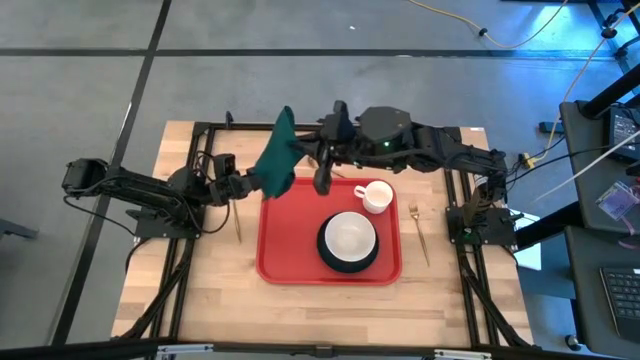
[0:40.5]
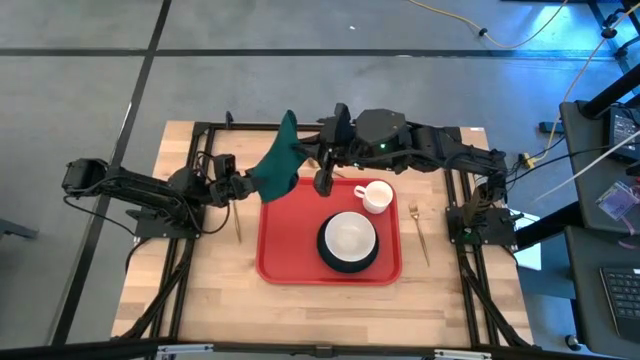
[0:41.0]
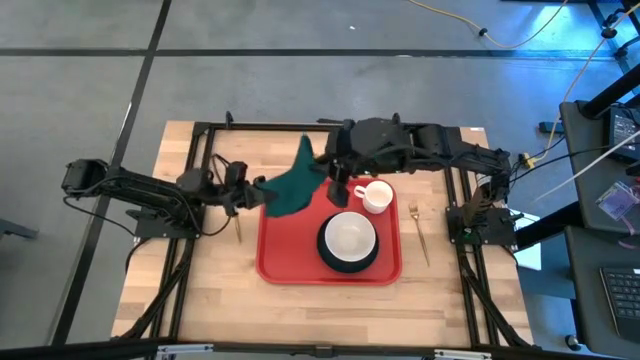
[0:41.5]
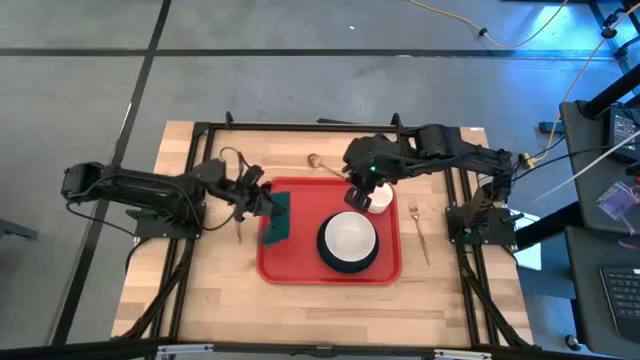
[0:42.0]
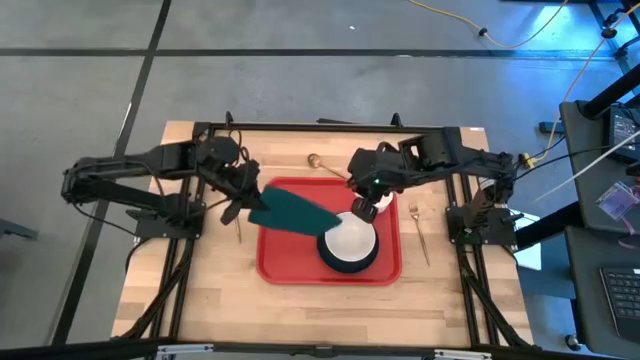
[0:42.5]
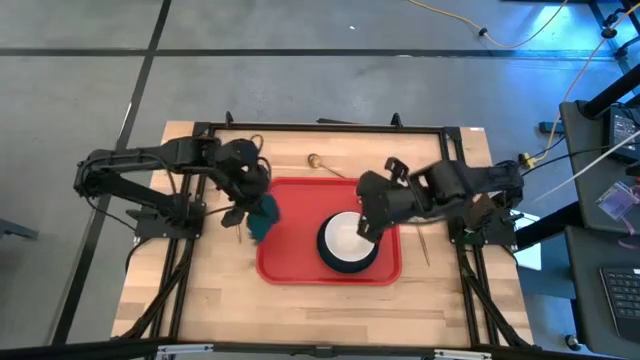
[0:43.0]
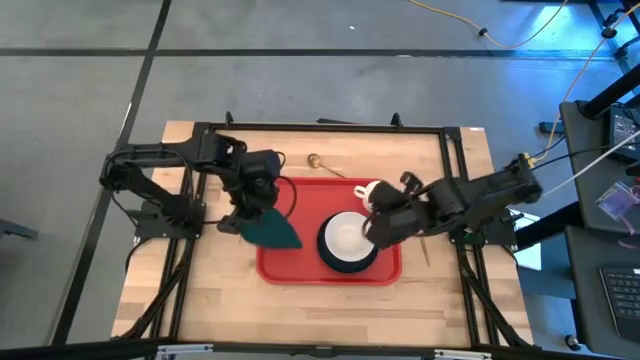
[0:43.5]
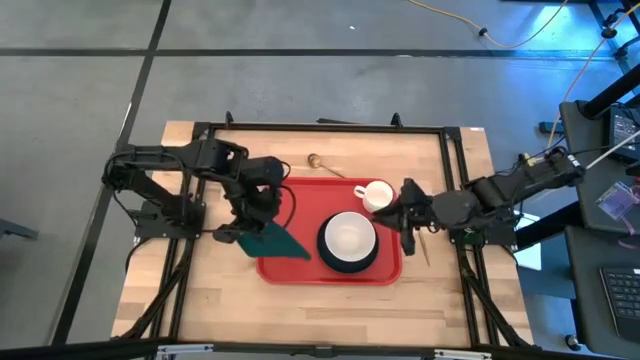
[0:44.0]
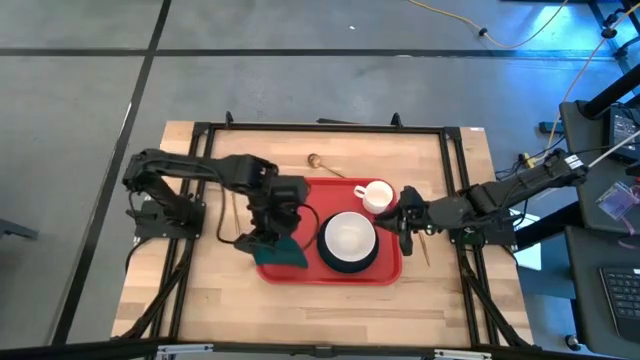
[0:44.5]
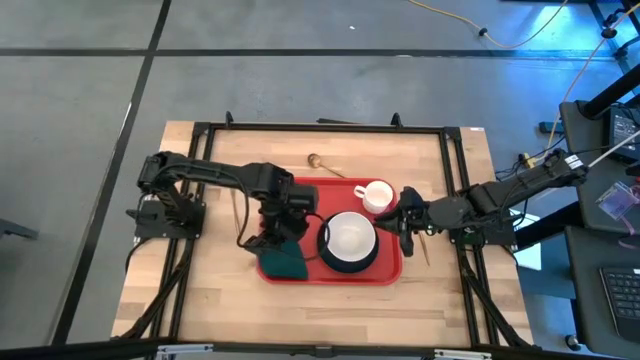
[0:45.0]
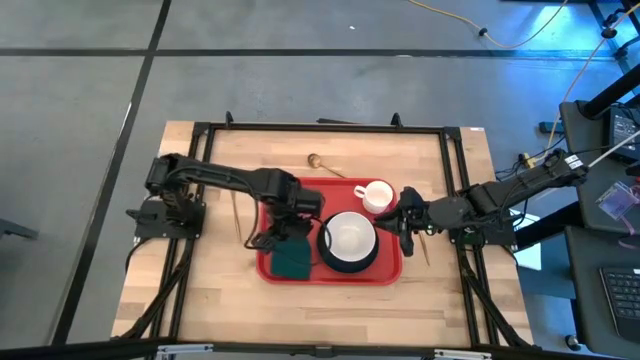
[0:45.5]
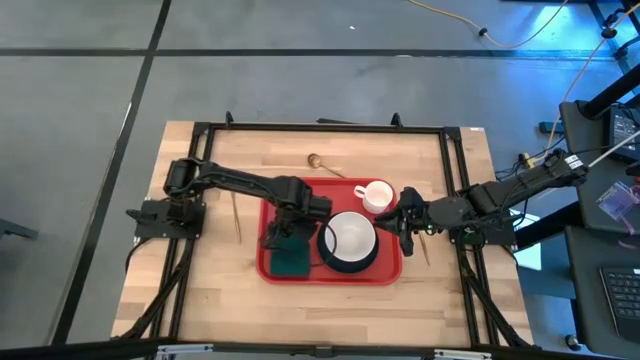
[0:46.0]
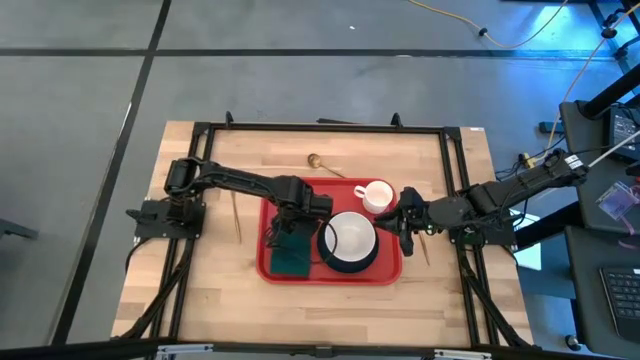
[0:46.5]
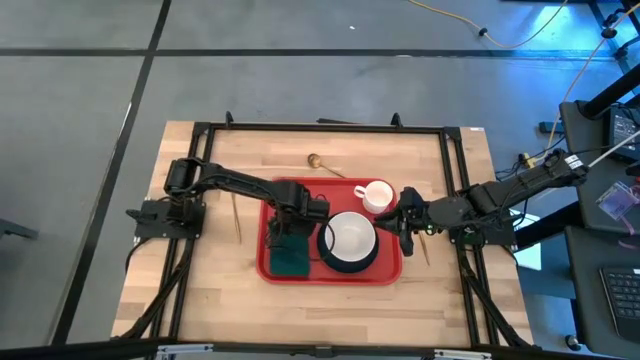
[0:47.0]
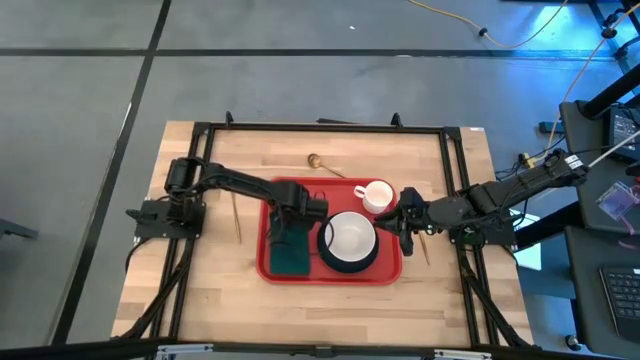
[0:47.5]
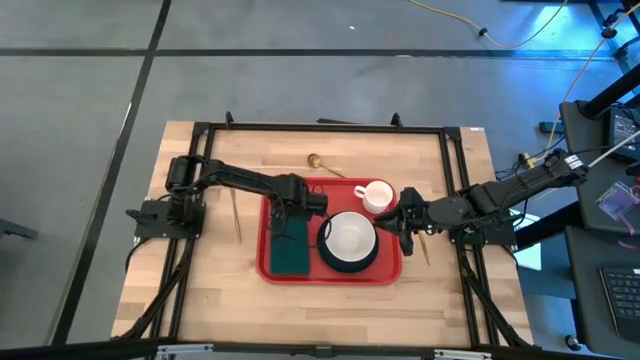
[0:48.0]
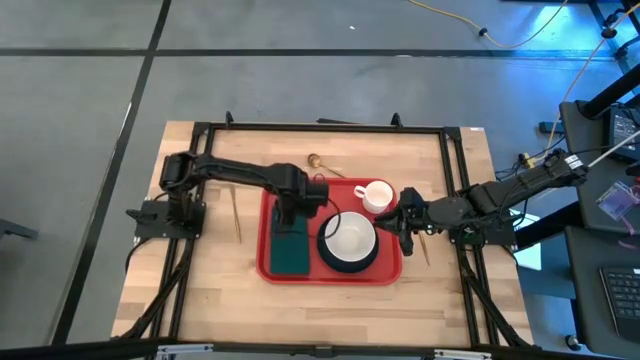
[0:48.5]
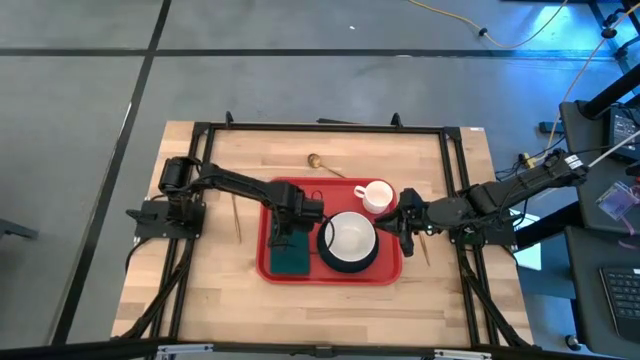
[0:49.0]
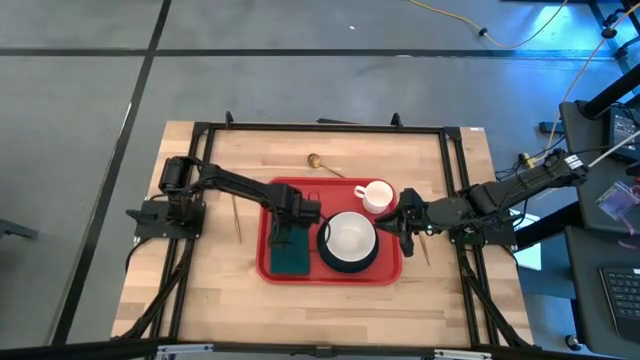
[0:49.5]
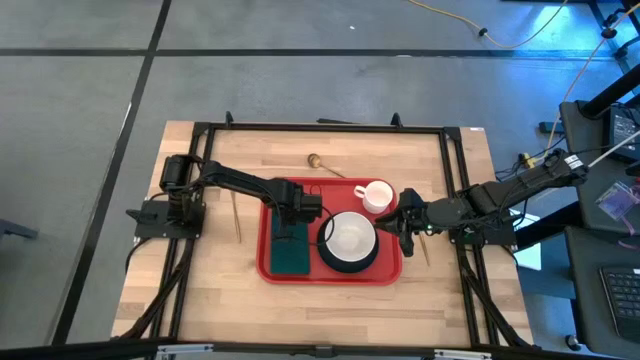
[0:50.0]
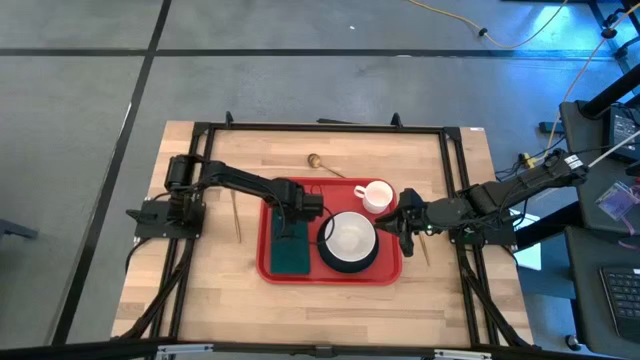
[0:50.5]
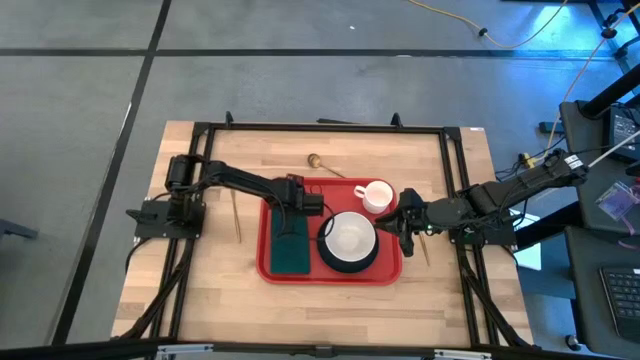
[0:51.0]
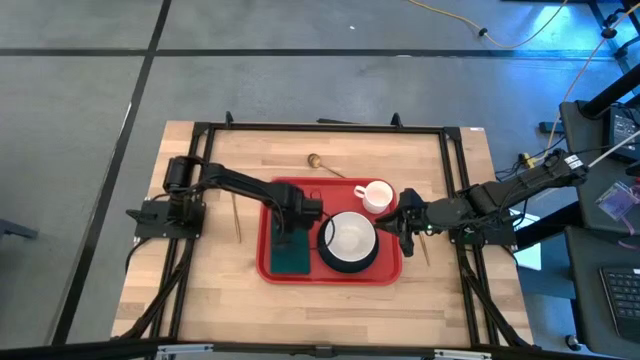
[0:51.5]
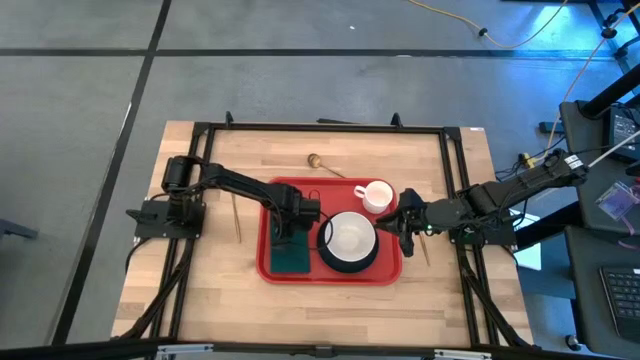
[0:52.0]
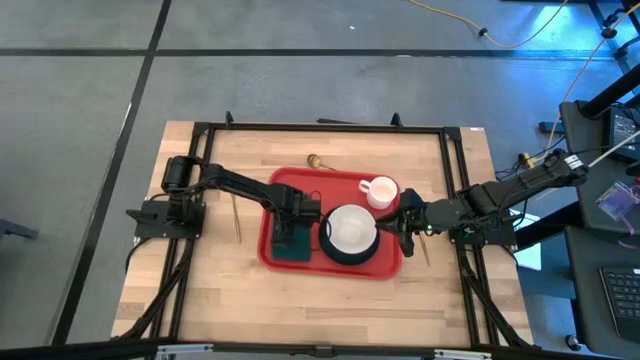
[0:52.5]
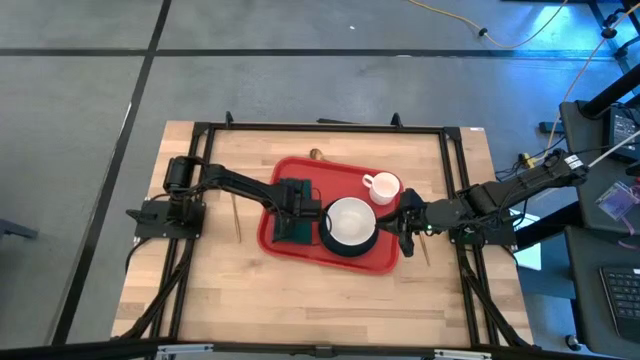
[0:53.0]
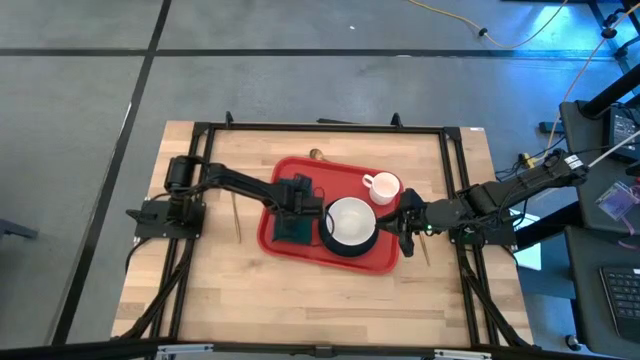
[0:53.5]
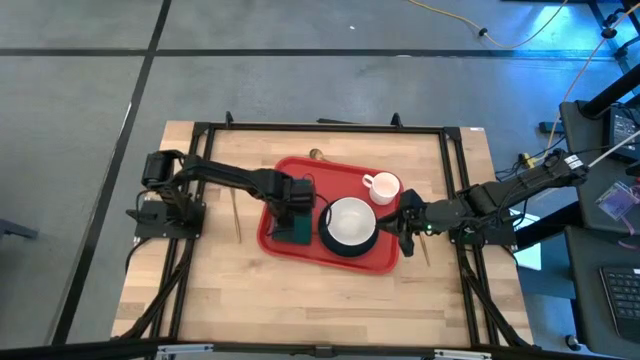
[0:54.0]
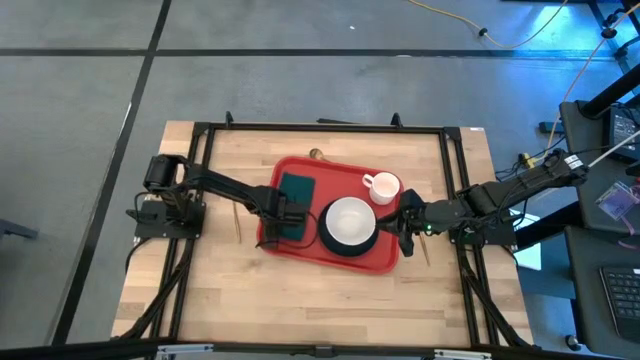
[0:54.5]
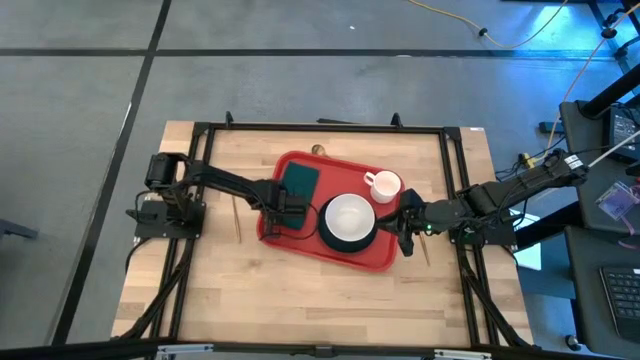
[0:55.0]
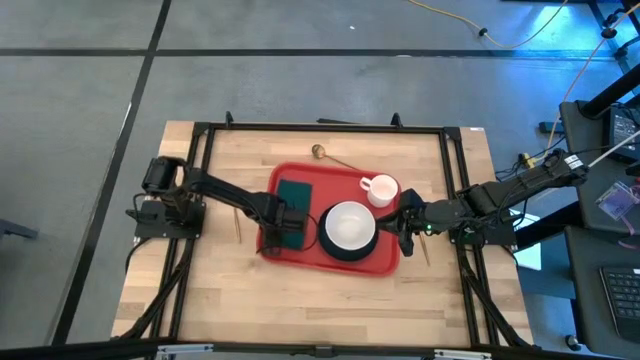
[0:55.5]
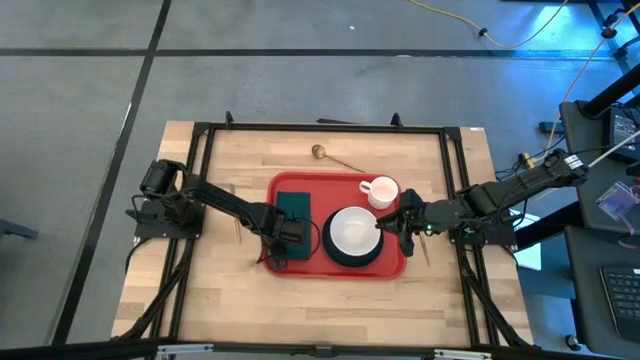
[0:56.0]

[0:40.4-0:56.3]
Task: Set up tray
Put the dark green napkin on the orange tray to the left of the black plate

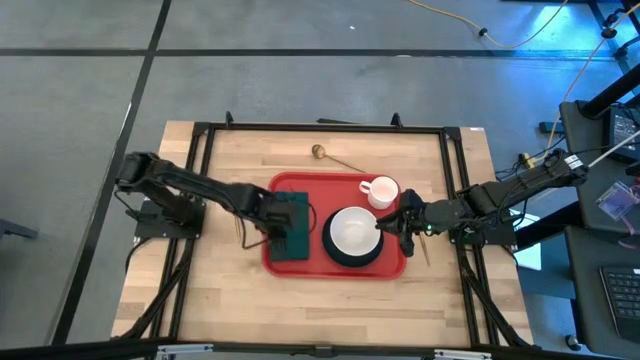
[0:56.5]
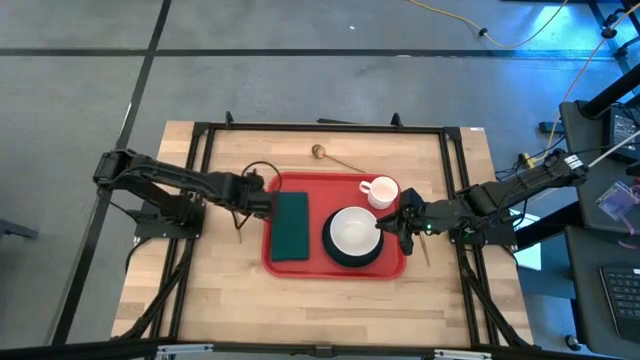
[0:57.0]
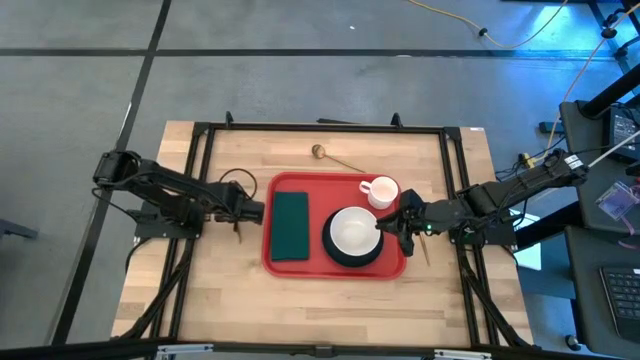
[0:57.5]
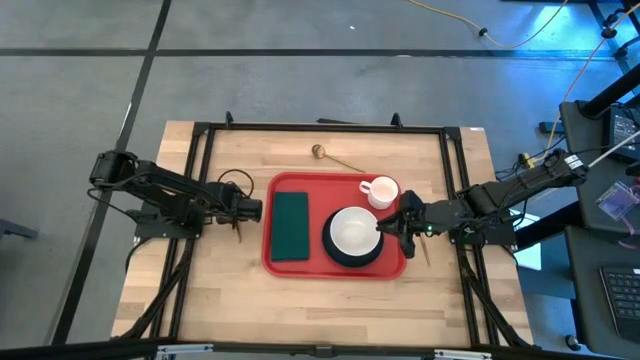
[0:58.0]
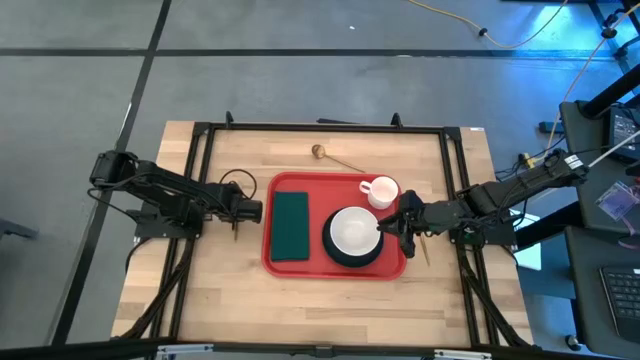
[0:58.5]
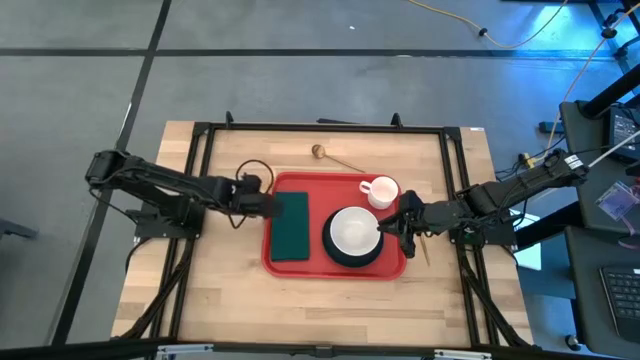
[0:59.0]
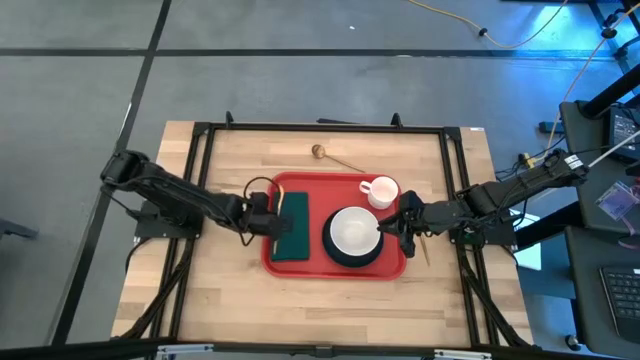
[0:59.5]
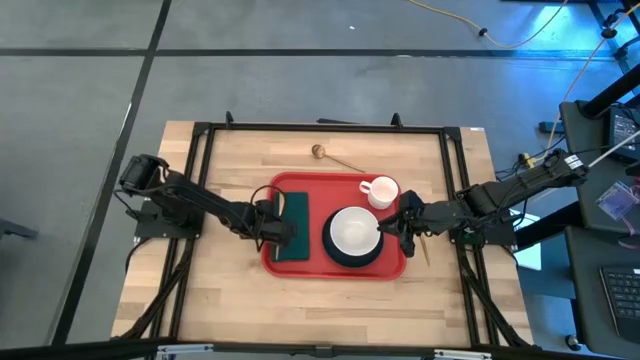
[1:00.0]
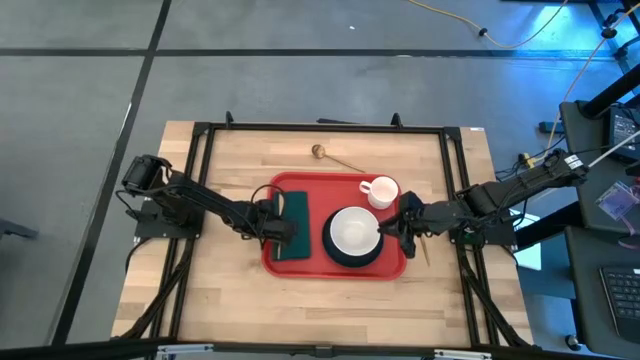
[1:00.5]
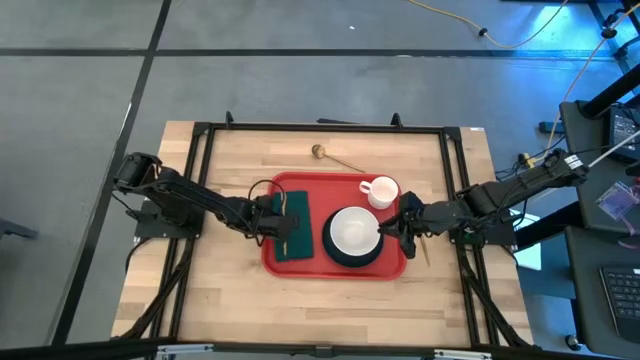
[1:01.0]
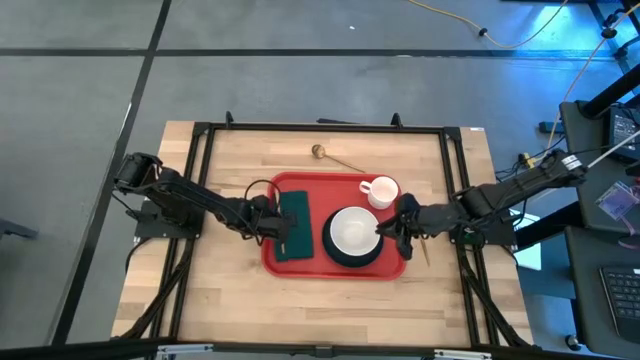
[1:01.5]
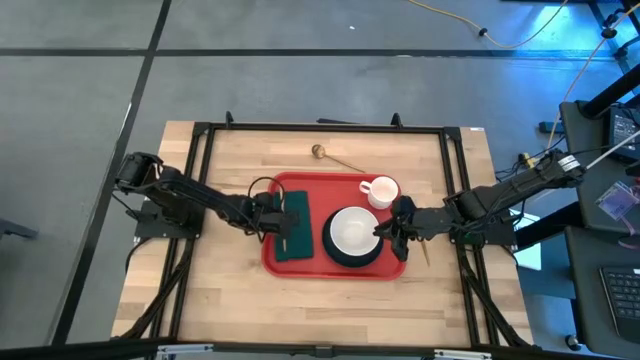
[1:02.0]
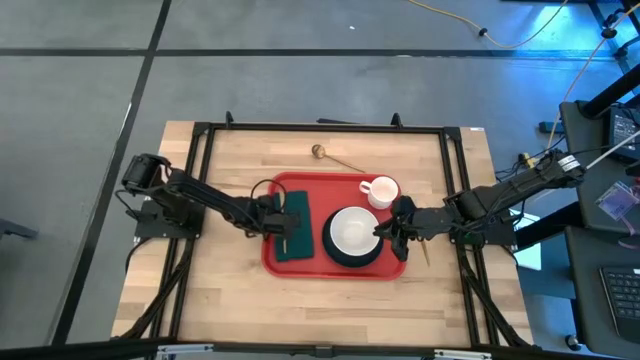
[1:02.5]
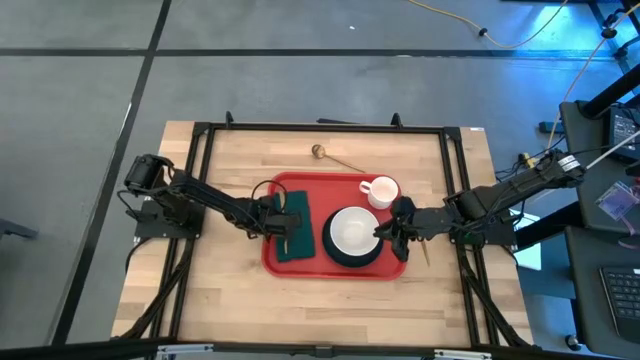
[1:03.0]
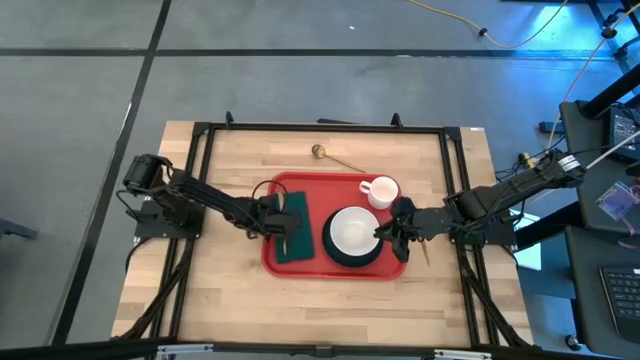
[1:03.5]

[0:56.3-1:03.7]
Put the gold knife on the dark green napkin
